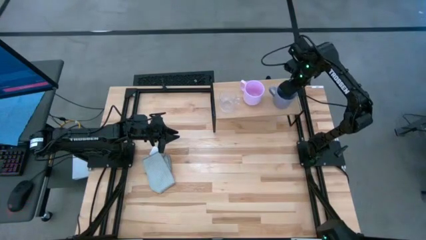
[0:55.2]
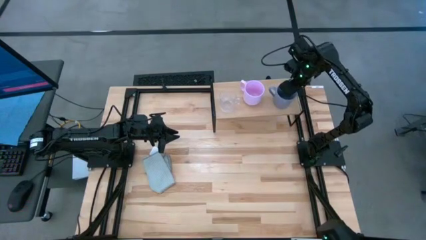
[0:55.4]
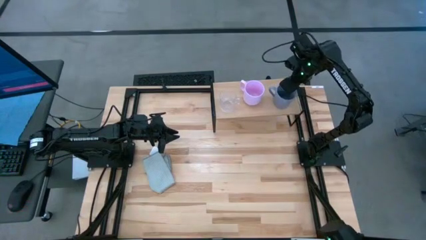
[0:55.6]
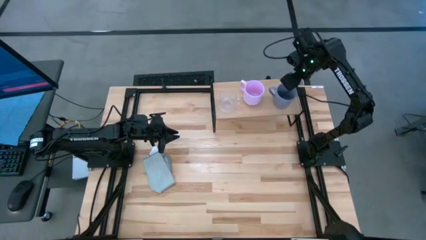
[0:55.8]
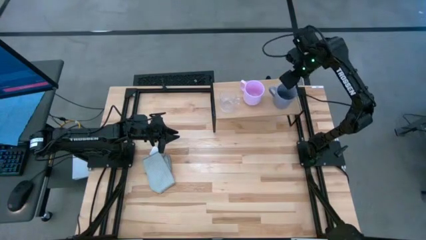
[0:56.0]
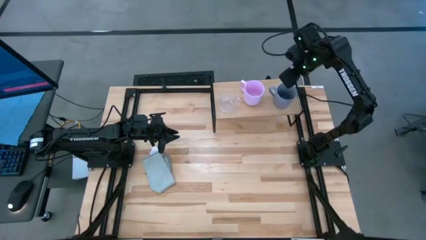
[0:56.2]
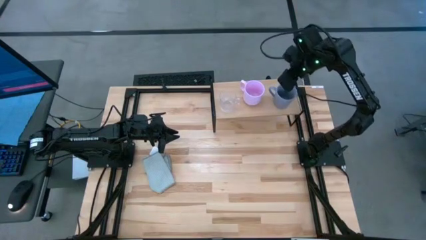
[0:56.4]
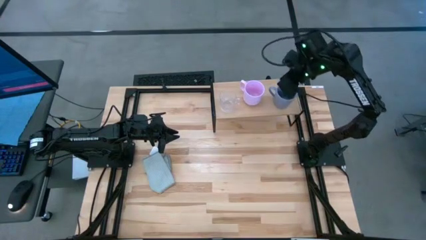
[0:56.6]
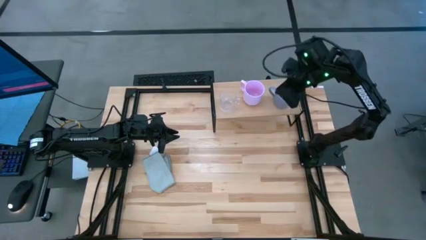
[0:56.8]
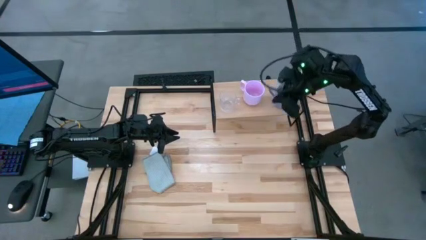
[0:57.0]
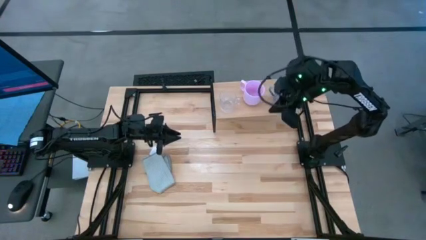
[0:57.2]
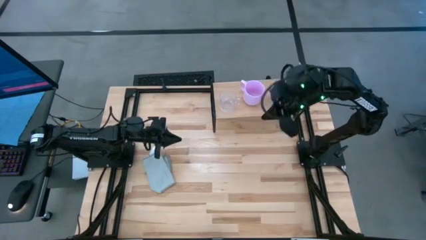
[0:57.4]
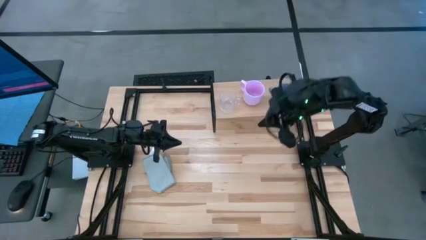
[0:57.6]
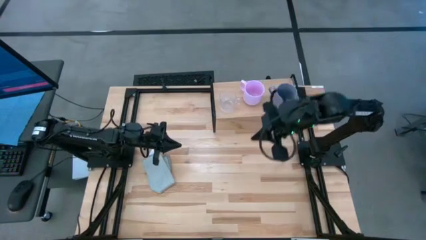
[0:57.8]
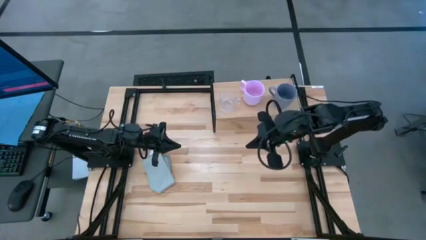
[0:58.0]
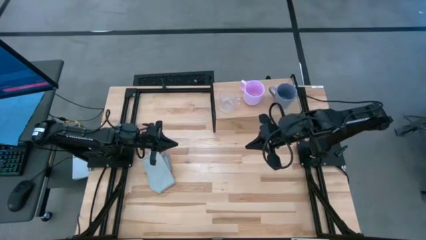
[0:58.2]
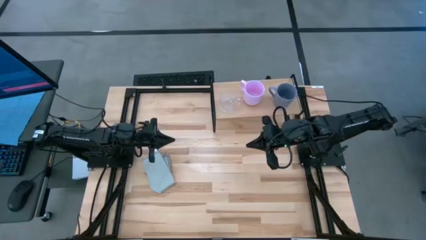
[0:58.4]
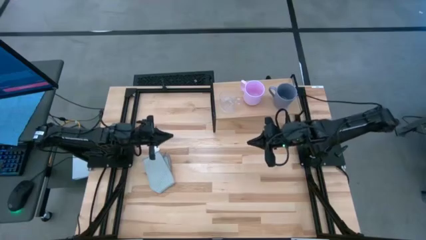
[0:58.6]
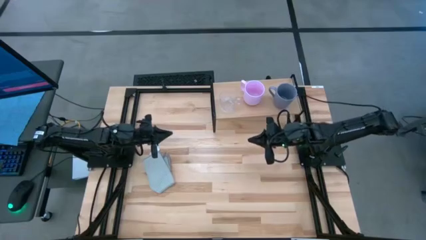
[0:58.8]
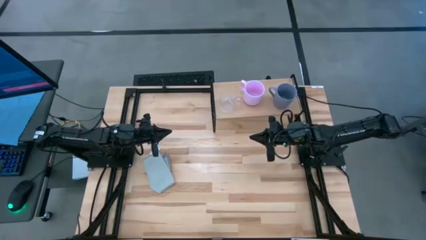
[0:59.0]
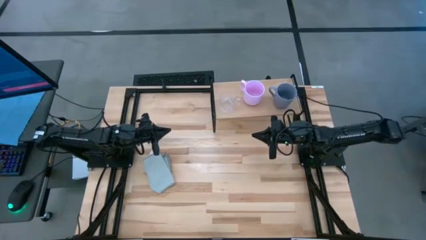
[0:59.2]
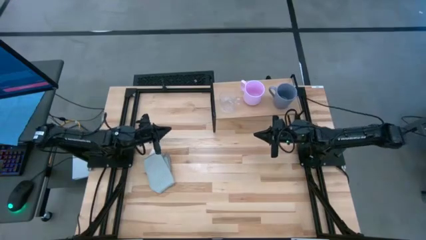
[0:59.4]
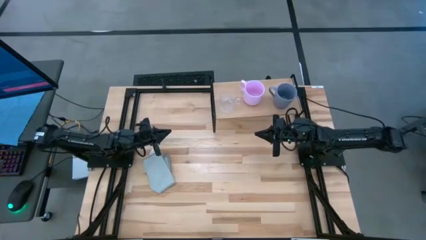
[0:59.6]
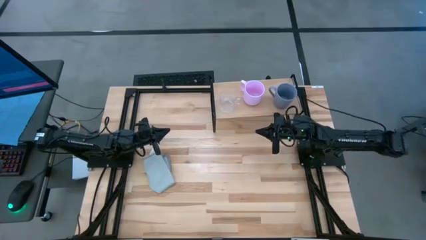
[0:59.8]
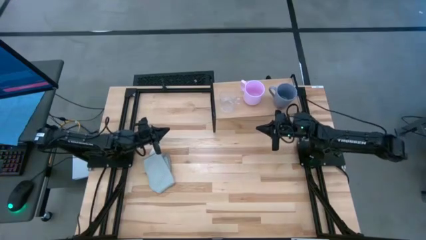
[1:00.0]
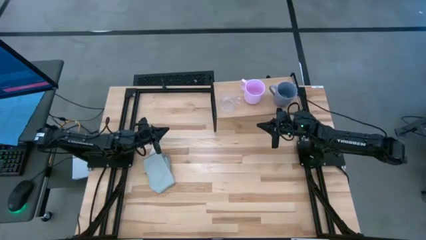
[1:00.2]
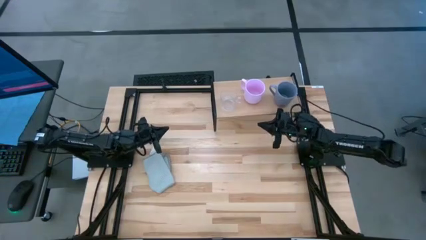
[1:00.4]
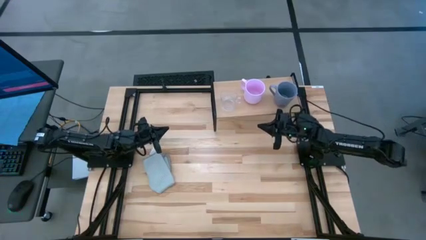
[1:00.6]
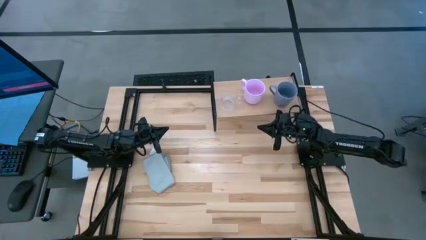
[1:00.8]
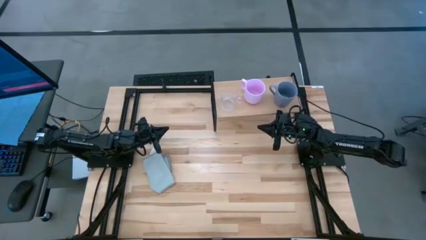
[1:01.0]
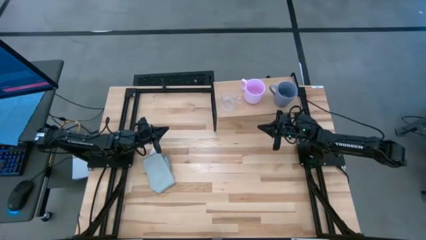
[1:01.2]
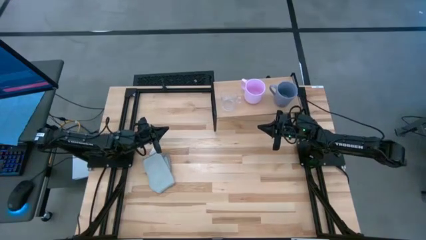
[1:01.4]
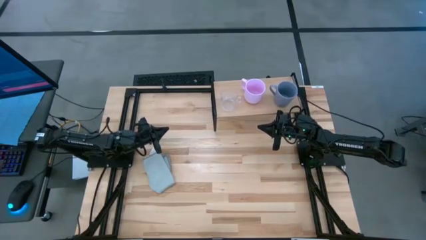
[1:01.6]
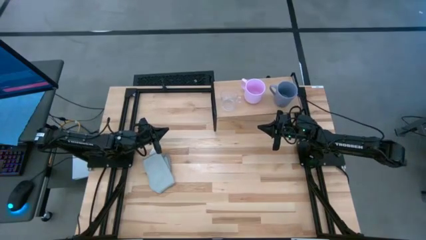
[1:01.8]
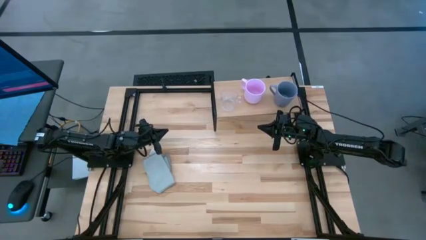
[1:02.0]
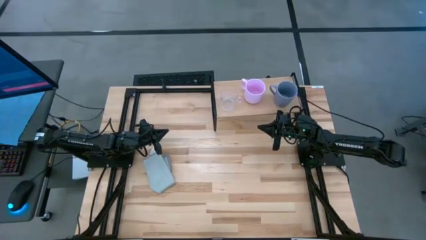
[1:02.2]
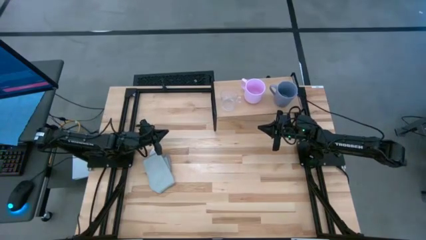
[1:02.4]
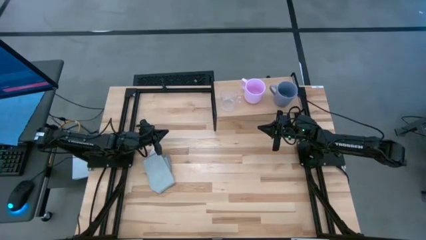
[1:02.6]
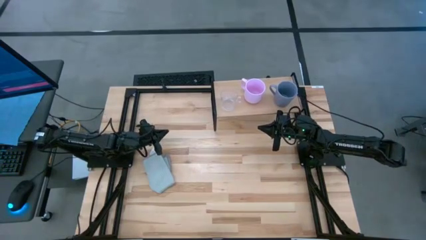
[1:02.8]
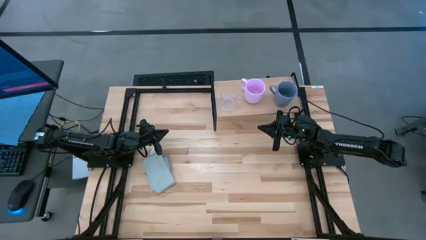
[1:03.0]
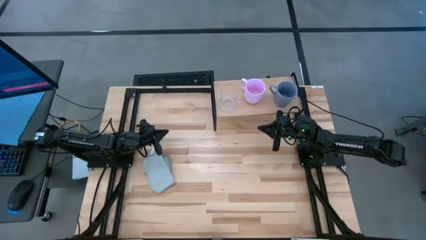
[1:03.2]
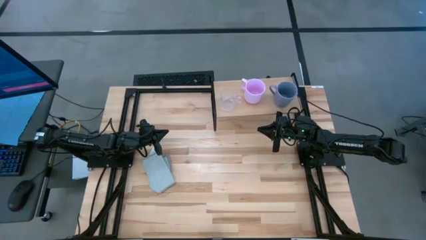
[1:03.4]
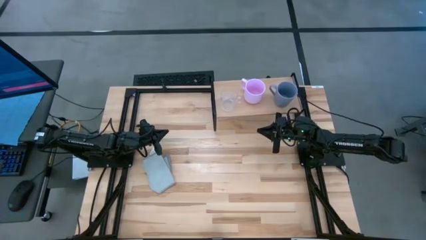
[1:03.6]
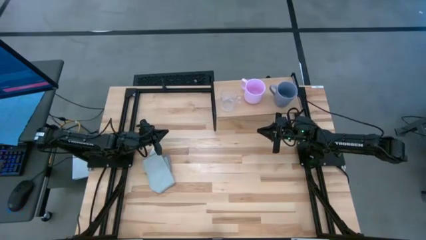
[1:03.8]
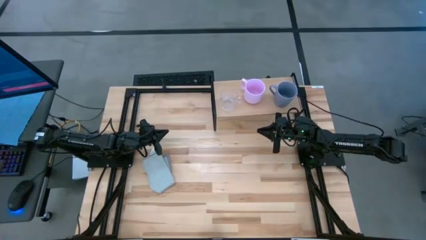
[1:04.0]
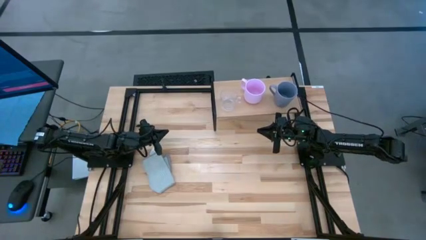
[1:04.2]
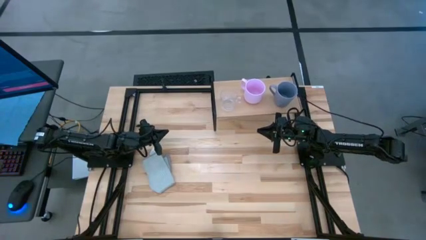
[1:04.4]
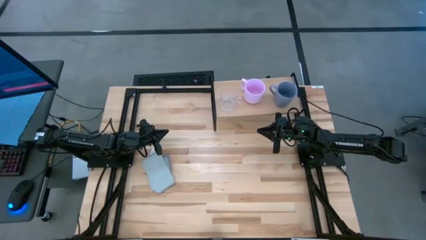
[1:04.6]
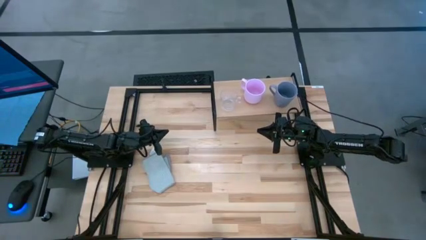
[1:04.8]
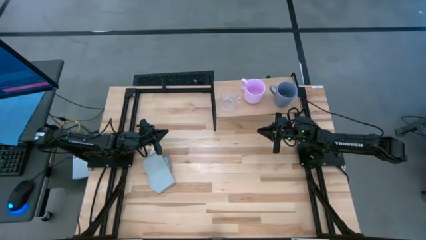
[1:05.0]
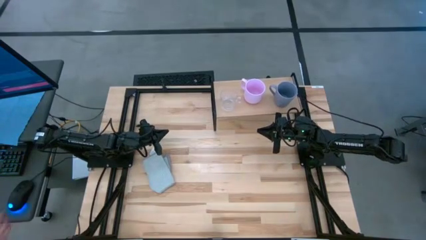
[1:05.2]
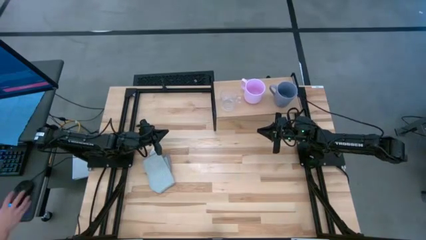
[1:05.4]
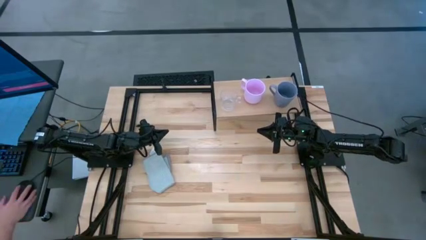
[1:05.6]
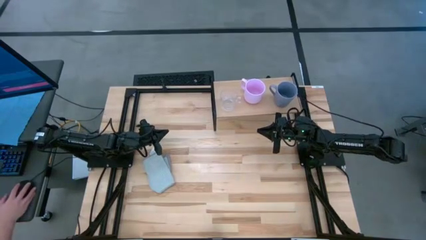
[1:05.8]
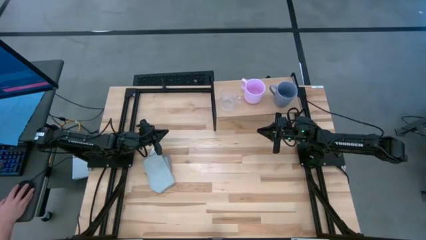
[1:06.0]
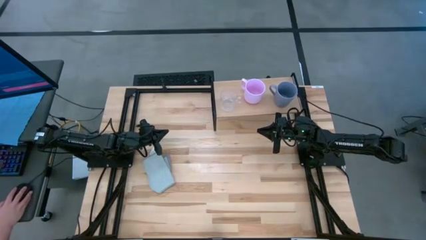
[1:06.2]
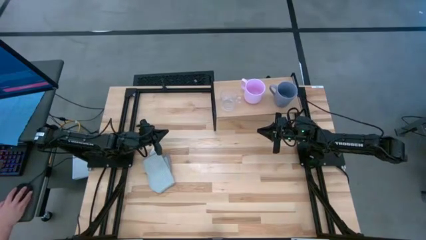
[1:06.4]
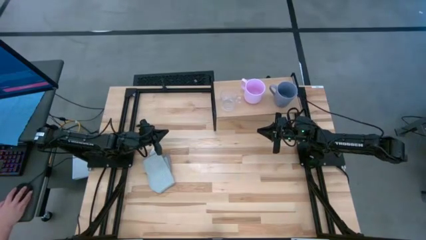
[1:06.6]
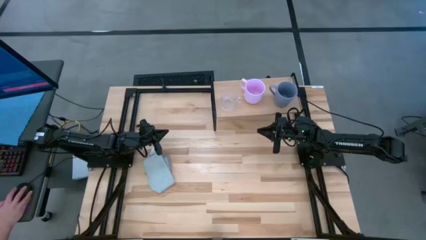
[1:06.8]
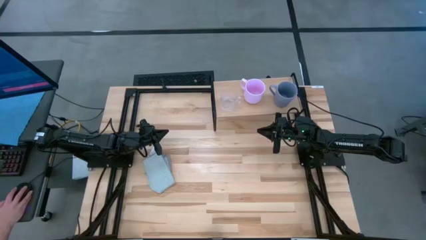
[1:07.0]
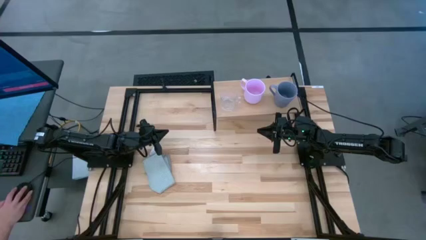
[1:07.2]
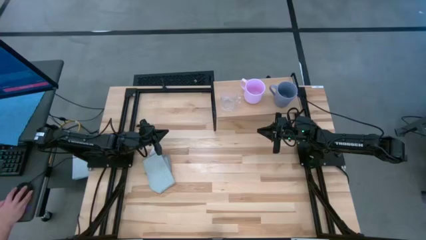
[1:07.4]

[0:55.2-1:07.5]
Task: Stack small to large cups/mugs on shelf
Return to Home Position
